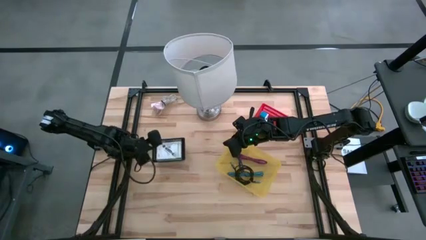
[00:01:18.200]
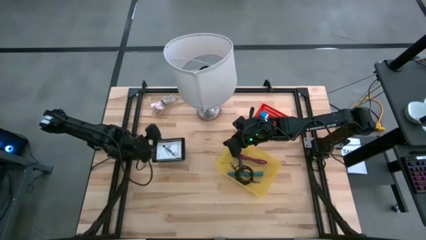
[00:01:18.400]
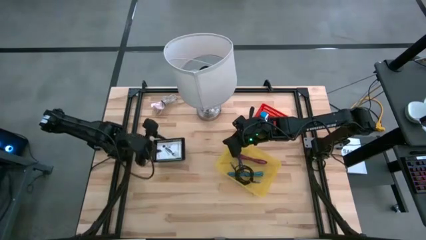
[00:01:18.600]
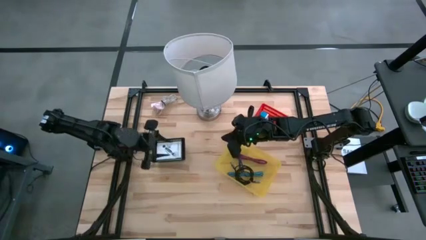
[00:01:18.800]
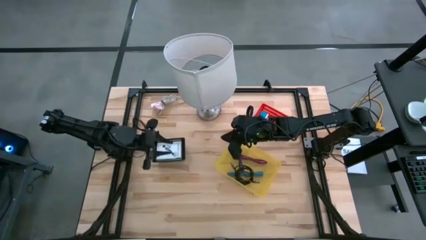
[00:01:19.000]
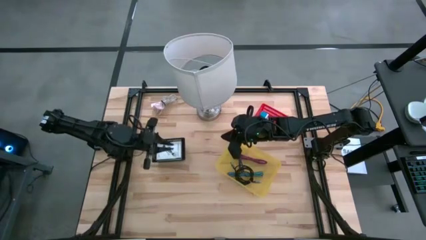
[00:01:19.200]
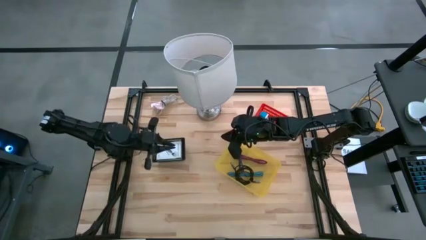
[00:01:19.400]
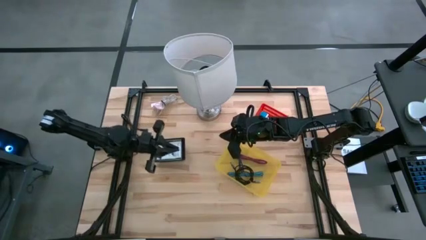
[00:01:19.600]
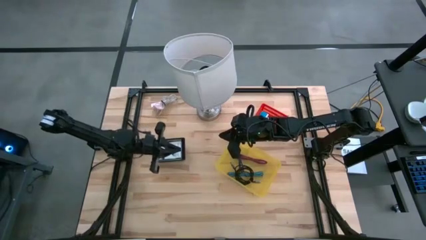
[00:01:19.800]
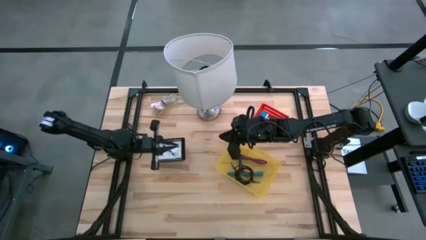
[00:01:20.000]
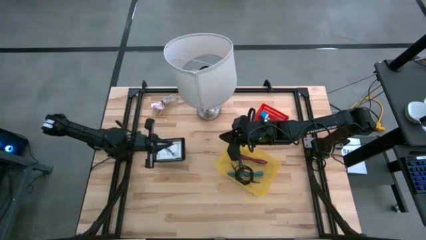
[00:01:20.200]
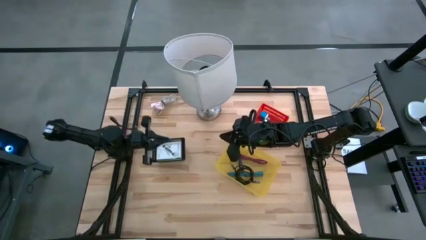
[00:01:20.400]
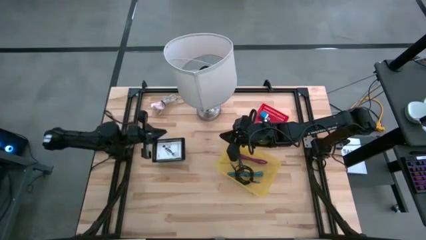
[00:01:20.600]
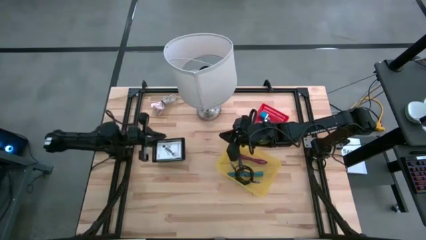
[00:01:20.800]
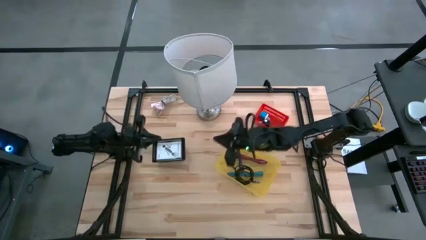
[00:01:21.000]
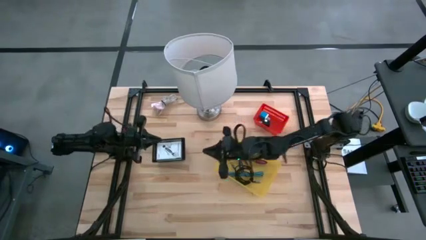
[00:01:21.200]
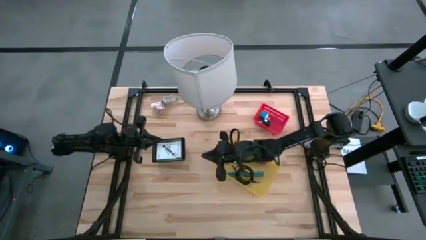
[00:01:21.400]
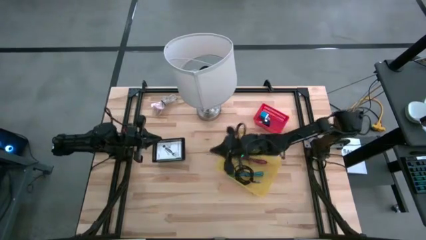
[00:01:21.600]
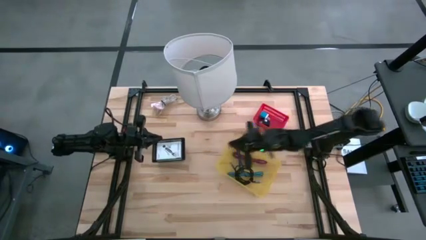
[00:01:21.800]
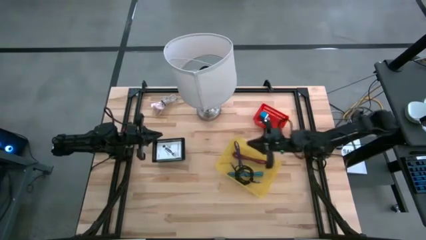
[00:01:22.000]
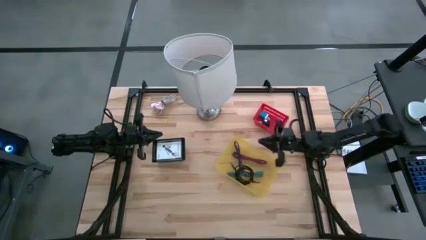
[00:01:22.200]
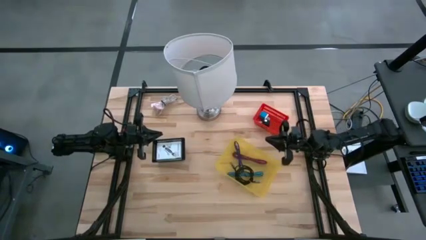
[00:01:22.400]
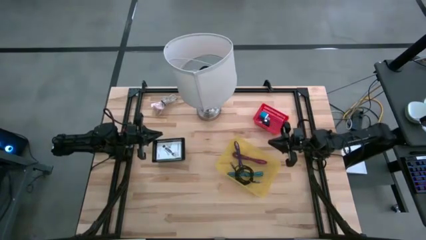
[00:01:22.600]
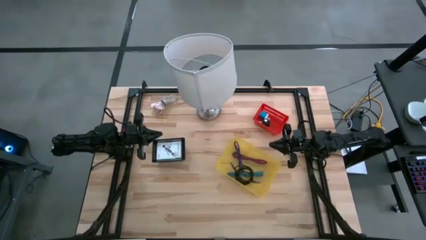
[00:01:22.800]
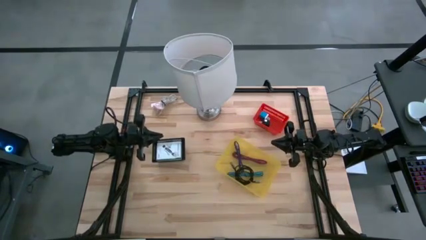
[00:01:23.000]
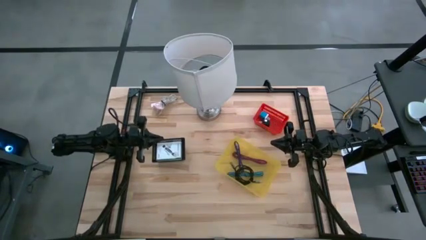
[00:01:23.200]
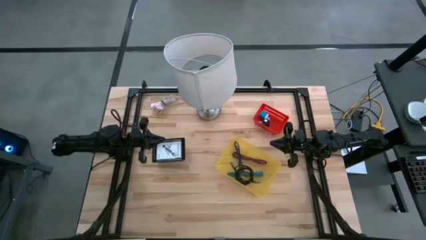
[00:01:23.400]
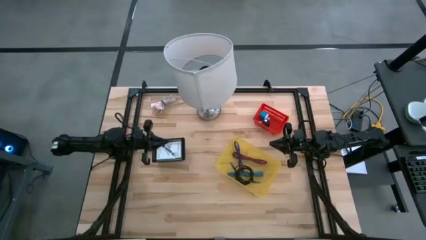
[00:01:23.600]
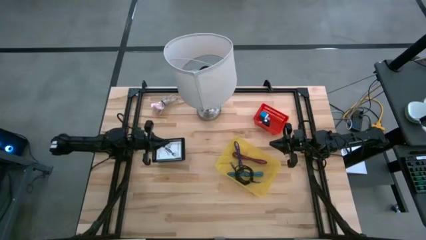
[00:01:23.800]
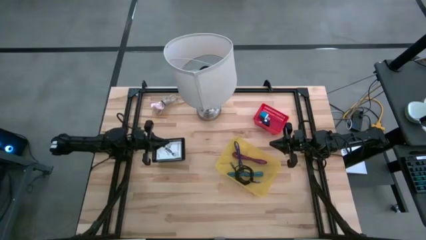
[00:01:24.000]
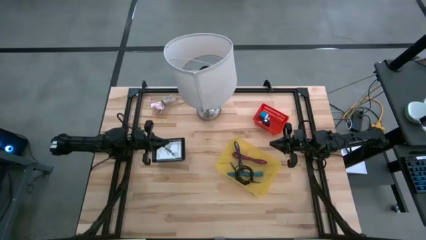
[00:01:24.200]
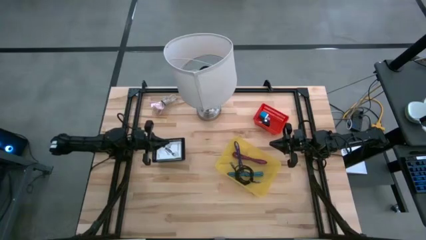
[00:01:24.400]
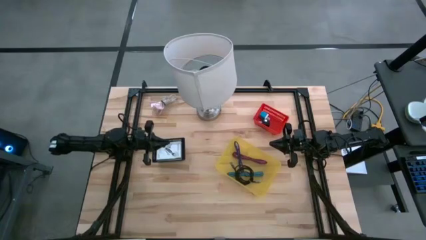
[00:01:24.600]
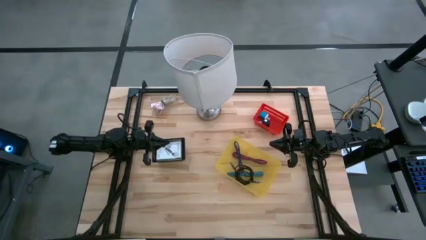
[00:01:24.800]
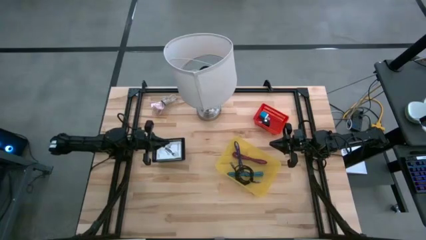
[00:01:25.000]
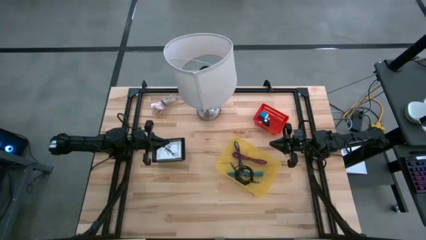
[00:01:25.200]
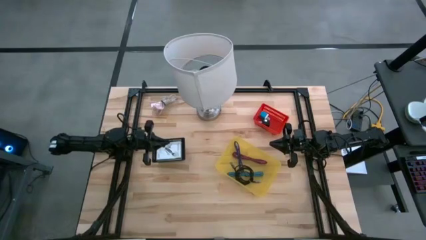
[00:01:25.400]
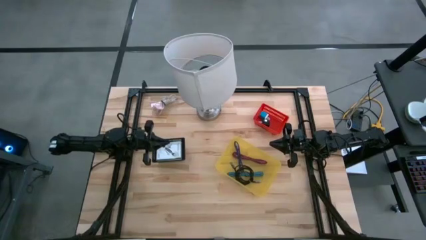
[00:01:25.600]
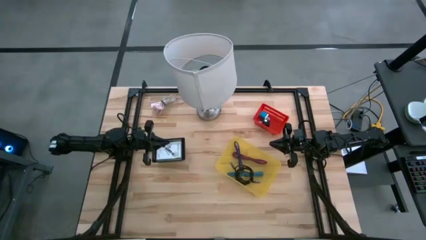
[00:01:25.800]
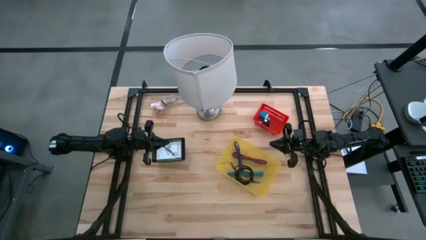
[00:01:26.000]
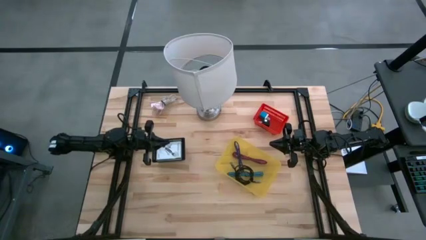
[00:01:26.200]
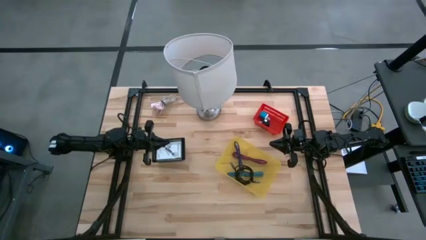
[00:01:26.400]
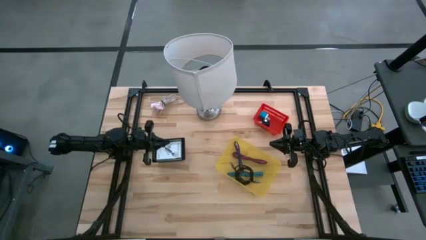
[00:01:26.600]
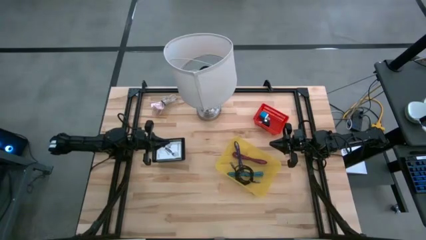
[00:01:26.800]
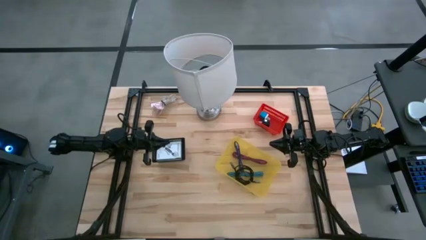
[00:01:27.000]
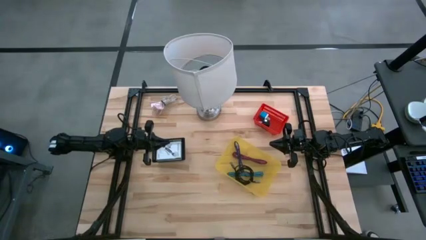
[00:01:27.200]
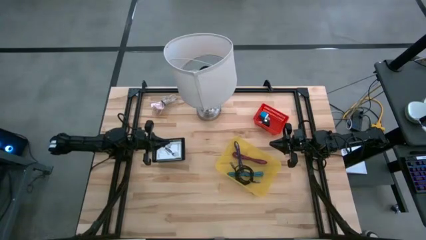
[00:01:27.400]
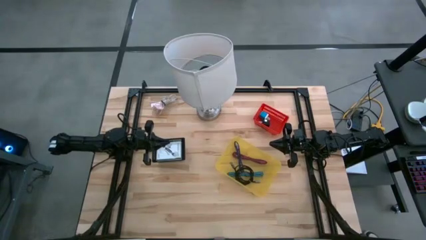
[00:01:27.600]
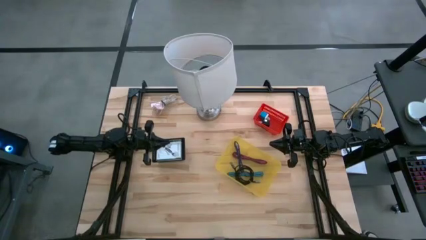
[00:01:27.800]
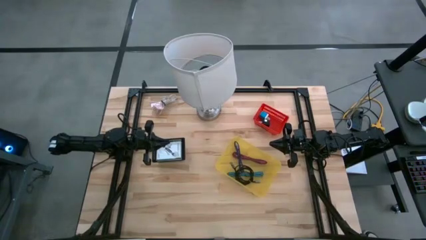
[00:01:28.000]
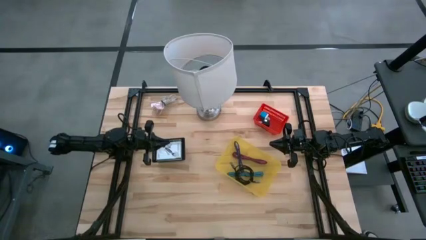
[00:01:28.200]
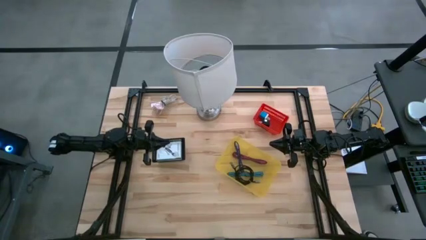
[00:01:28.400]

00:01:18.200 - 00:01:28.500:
Task: Pick and place items into bin
Return to Home Position
